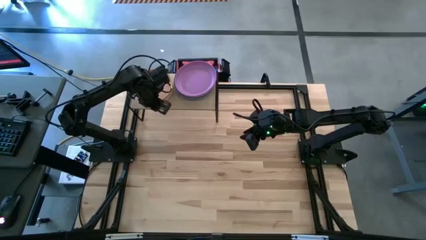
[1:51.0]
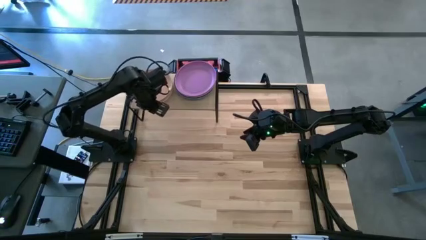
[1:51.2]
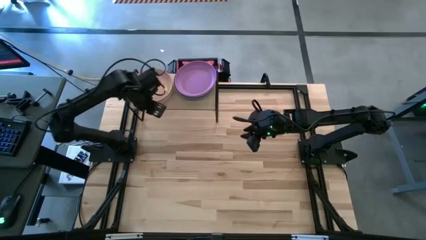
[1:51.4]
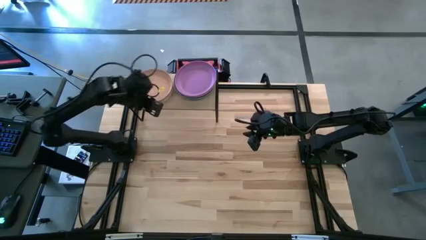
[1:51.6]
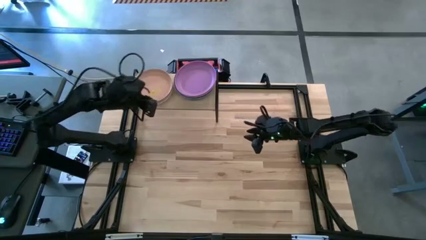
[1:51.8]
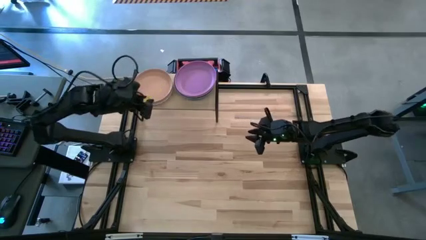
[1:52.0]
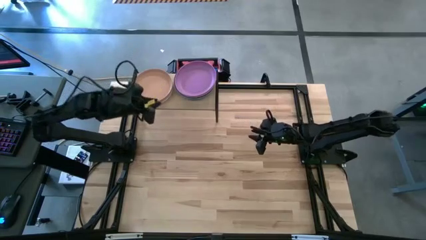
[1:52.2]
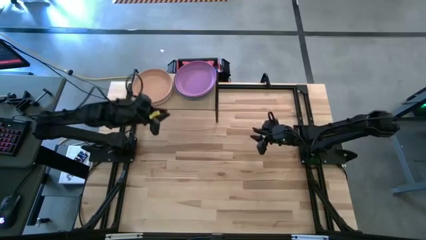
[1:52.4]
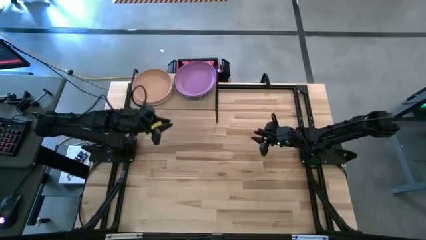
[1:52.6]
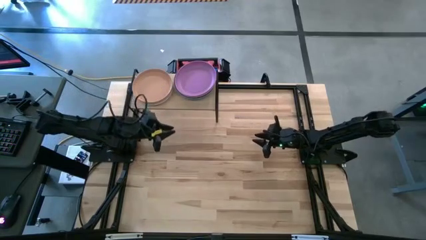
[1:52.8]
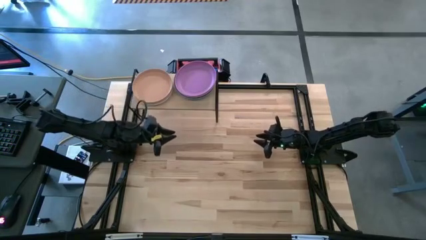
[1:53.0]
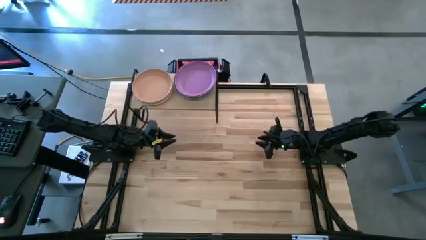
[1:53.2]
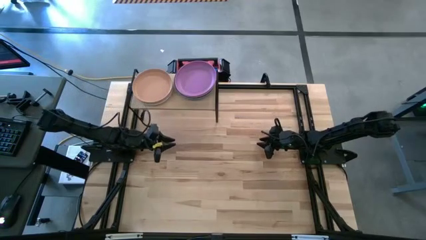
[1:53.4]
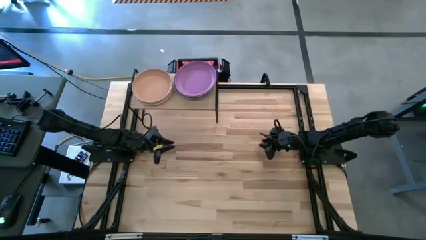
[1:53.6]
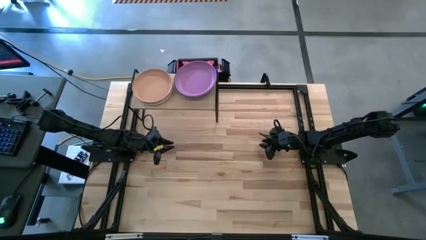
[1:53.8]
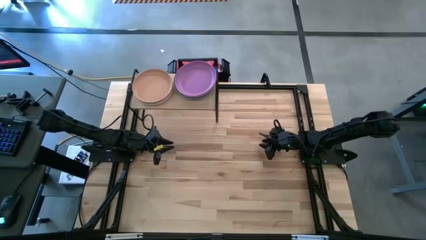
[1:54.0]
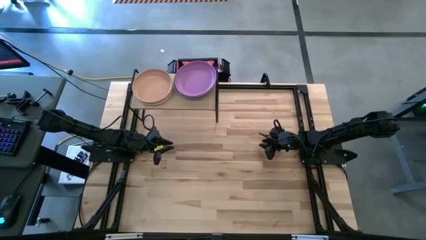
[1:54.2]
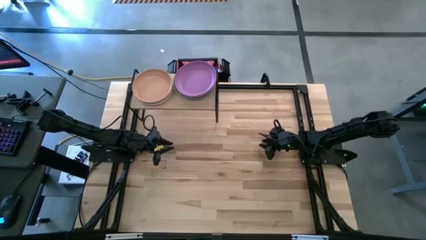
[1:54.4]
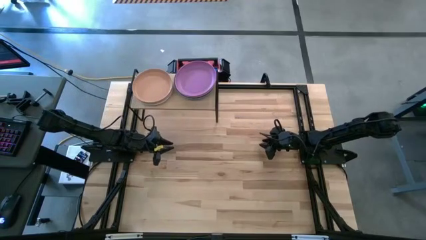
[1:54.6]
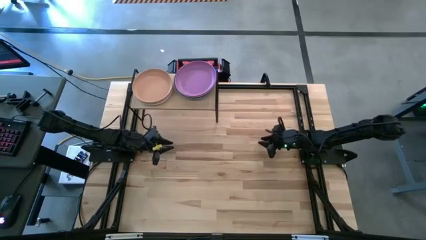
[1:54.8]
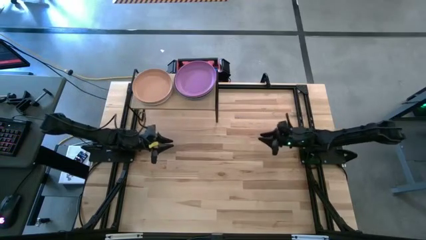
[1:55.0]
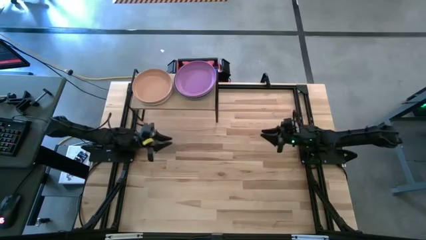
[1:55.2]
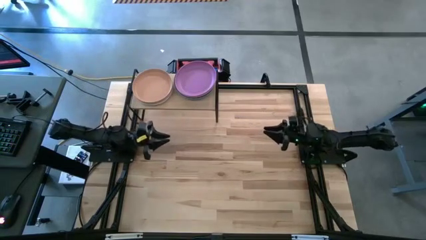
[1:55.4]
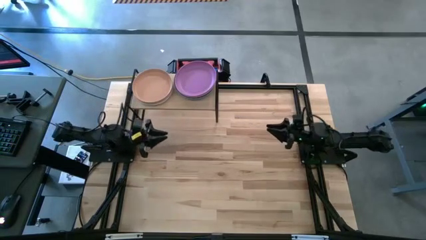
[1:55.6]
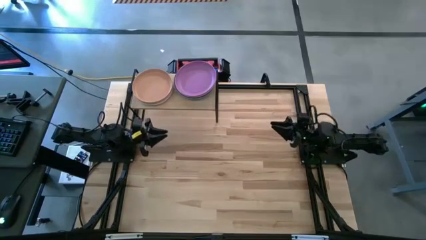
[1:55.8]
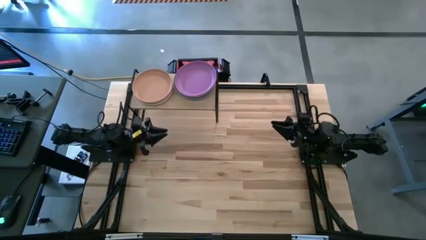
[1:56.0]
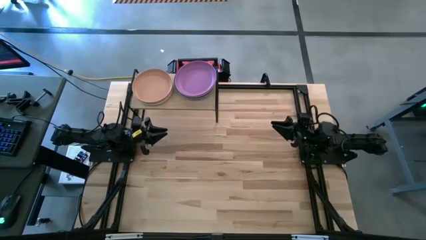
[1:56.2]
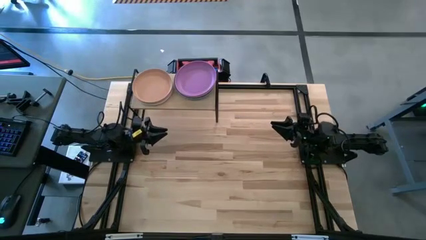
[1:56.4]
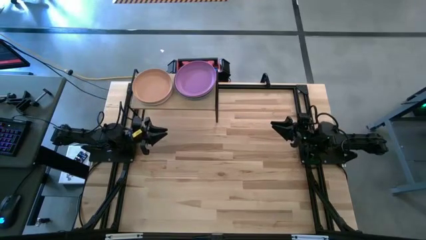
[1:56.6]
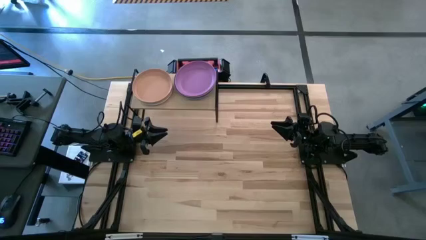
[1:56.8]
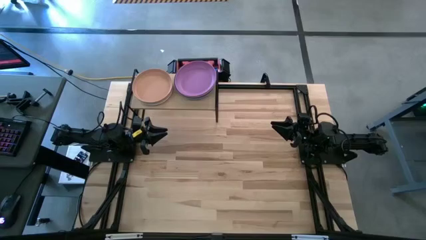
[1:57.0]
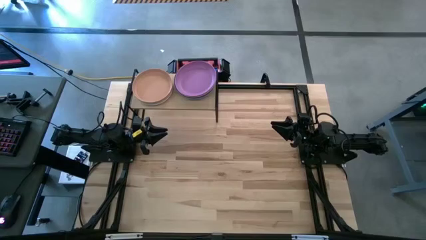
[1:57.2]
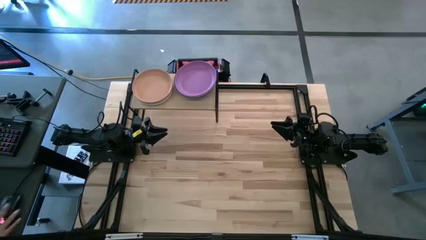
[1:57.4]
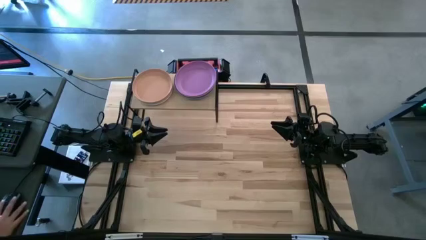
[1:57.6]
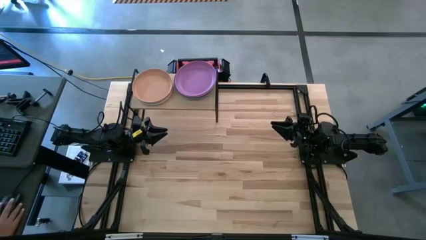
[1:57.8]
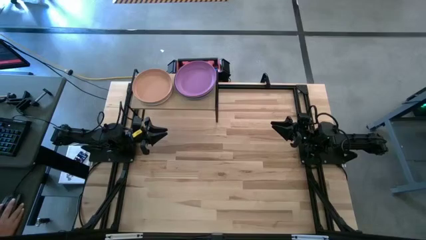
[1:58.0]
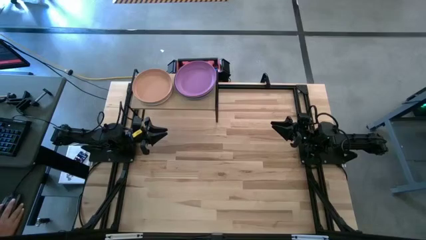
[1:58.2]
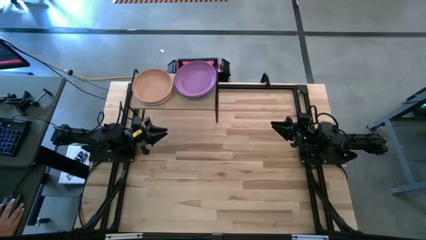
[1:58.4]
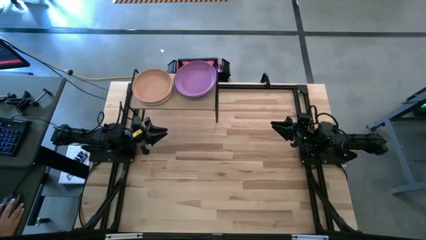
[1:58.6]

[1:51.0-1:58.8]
Task: Place and stack plates onto a shelf
Return to Home Position

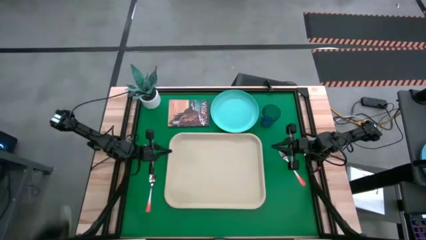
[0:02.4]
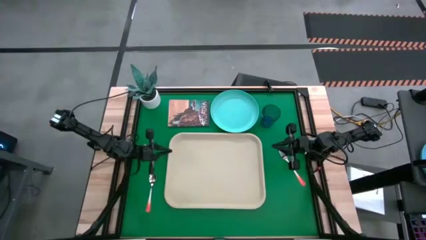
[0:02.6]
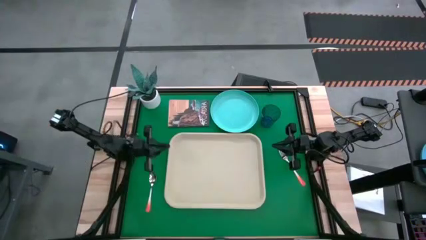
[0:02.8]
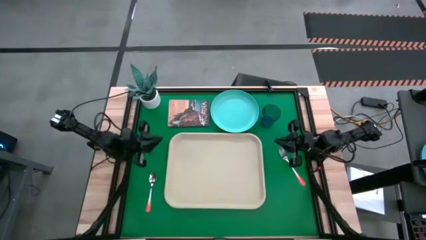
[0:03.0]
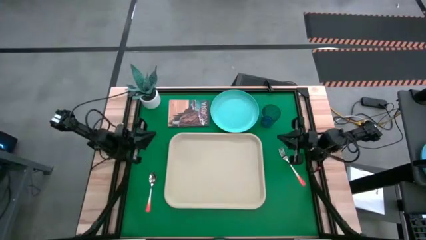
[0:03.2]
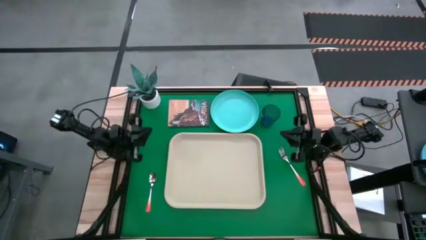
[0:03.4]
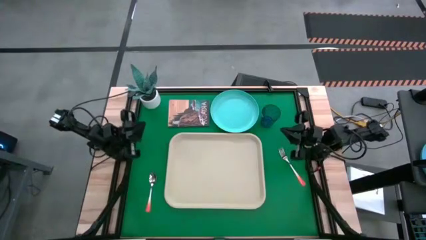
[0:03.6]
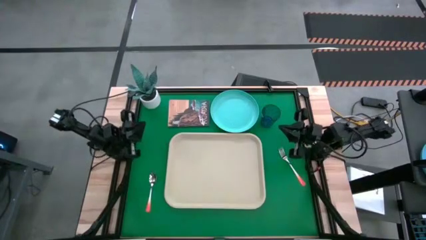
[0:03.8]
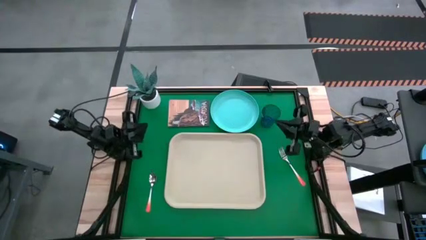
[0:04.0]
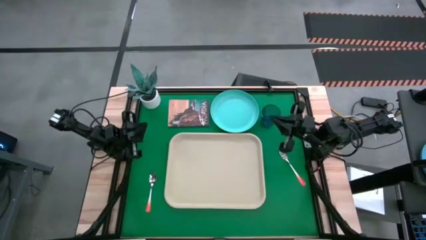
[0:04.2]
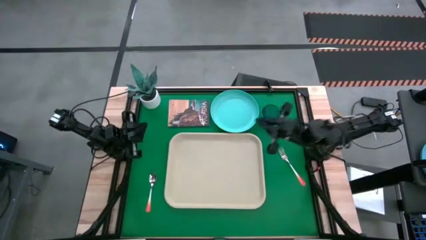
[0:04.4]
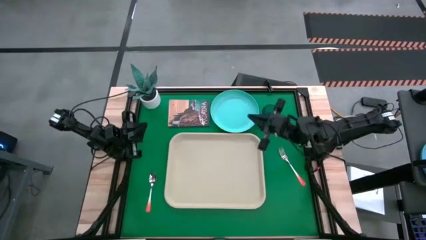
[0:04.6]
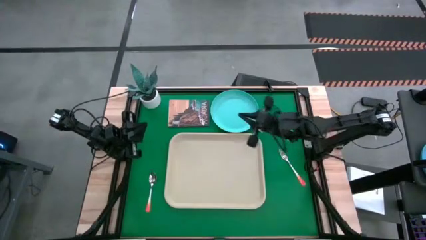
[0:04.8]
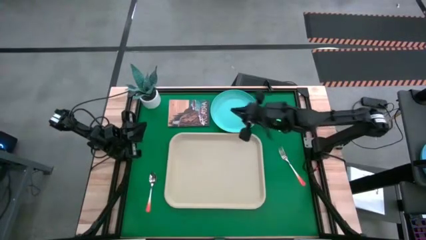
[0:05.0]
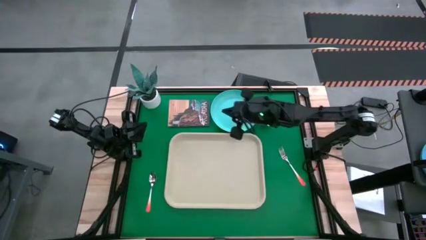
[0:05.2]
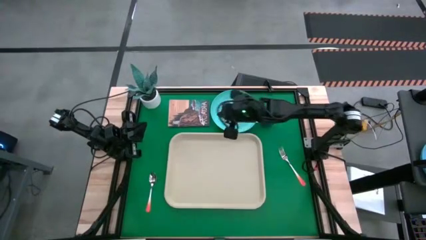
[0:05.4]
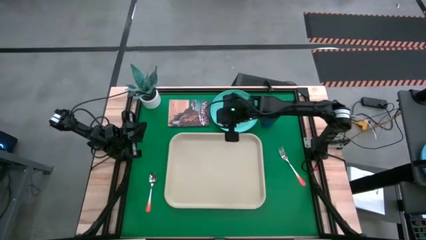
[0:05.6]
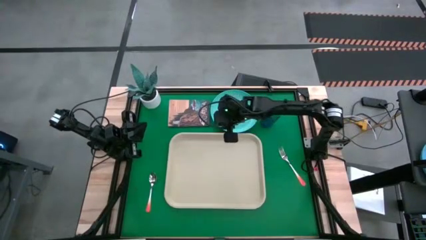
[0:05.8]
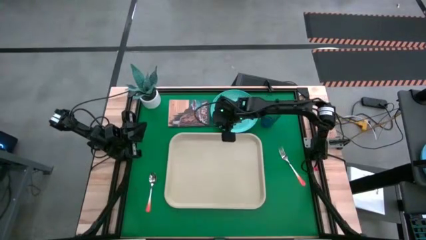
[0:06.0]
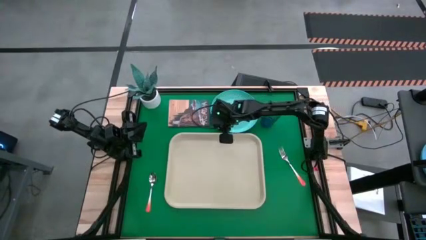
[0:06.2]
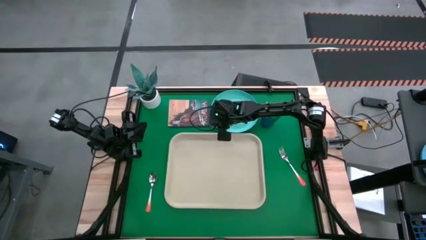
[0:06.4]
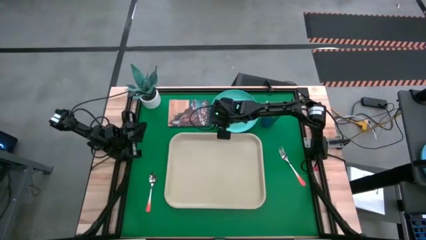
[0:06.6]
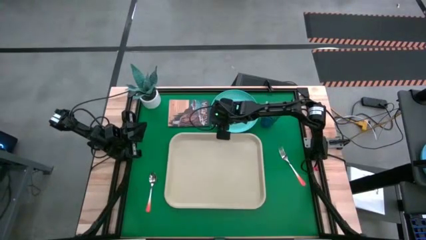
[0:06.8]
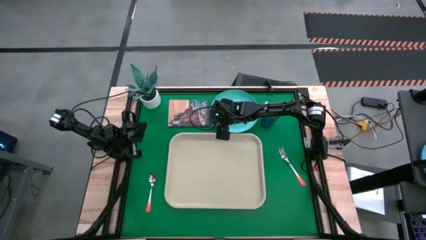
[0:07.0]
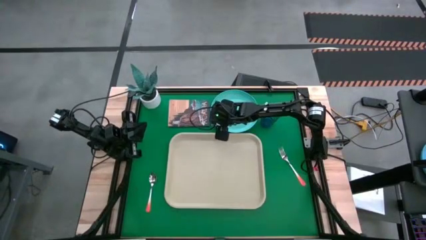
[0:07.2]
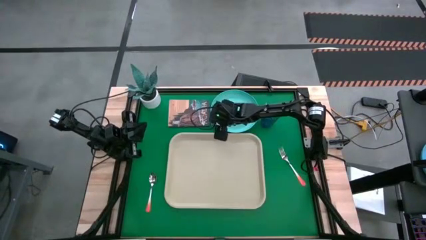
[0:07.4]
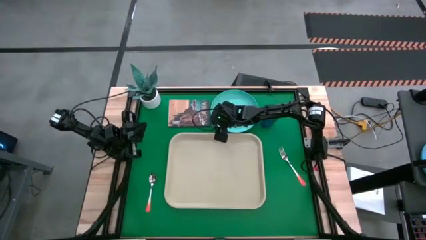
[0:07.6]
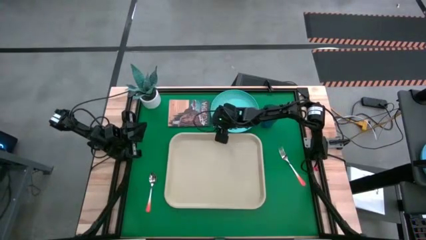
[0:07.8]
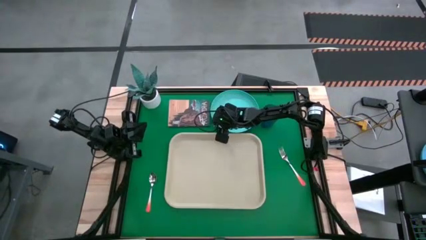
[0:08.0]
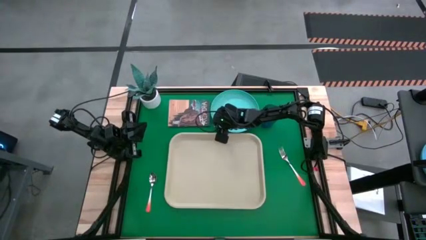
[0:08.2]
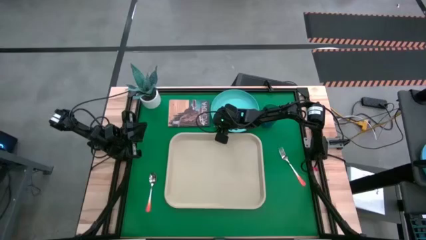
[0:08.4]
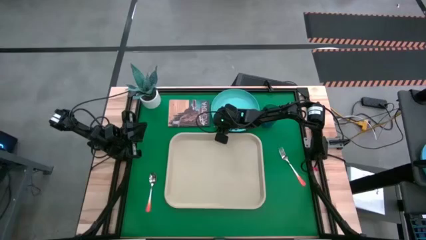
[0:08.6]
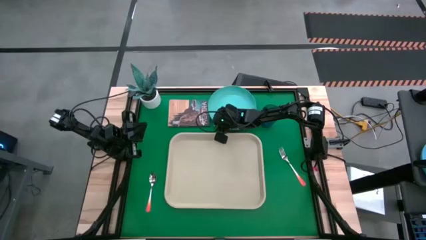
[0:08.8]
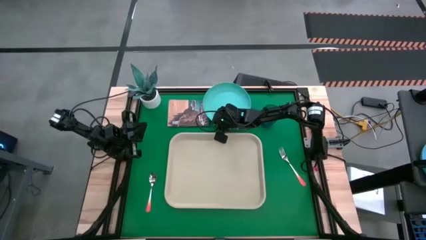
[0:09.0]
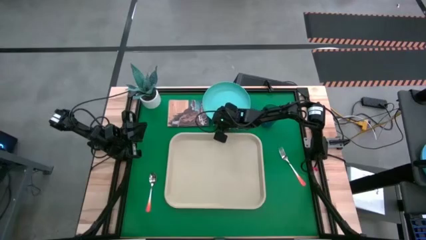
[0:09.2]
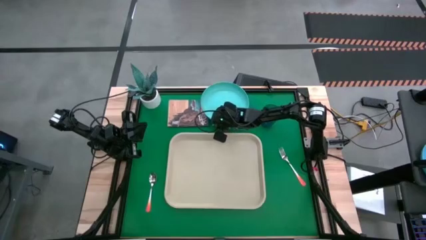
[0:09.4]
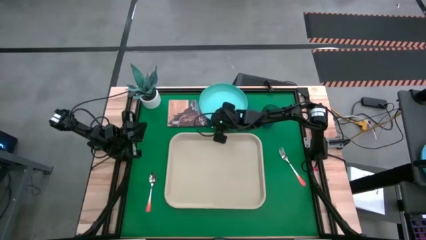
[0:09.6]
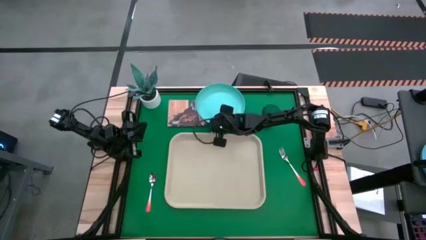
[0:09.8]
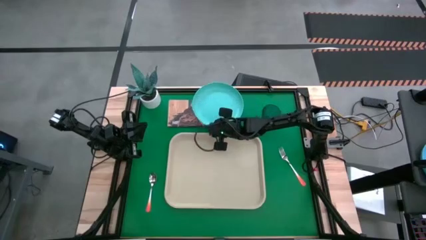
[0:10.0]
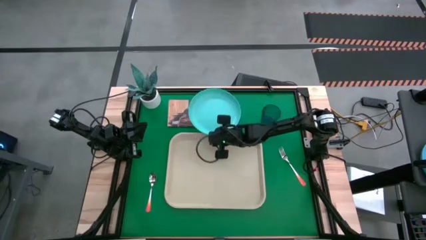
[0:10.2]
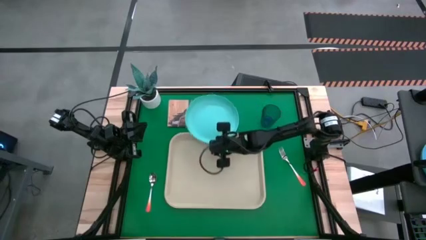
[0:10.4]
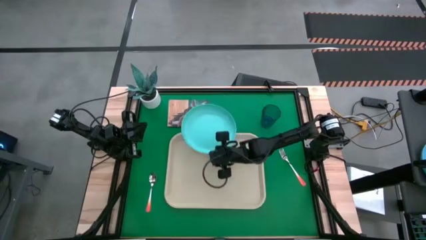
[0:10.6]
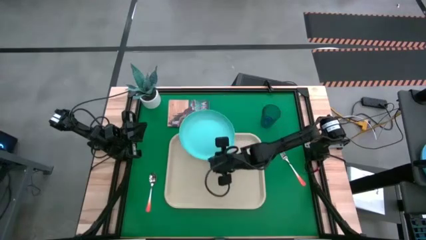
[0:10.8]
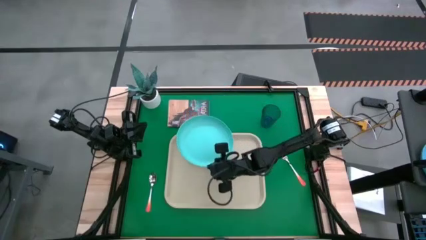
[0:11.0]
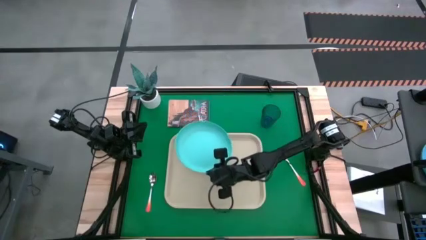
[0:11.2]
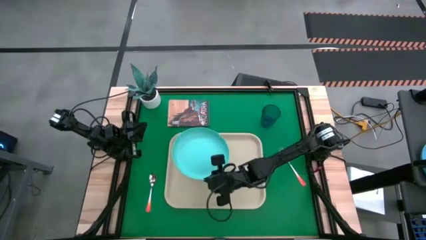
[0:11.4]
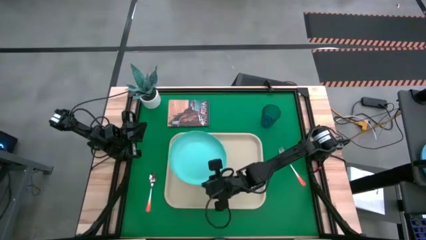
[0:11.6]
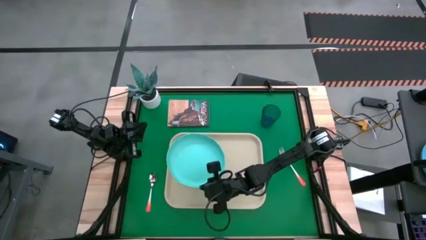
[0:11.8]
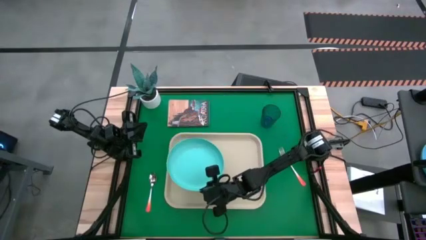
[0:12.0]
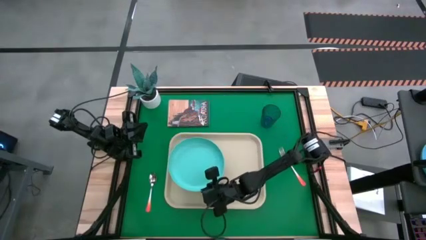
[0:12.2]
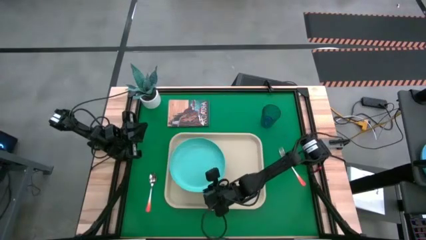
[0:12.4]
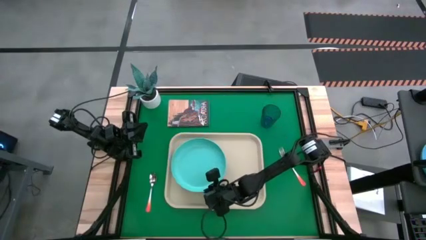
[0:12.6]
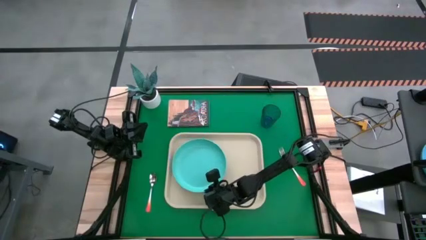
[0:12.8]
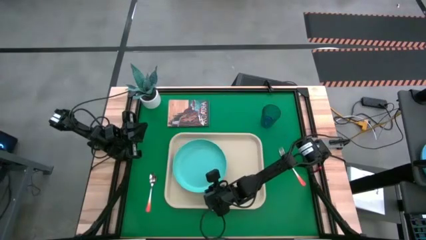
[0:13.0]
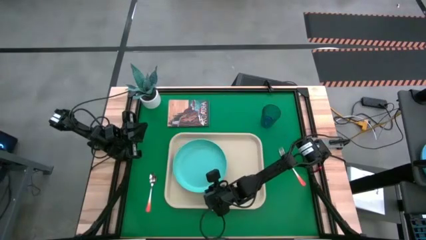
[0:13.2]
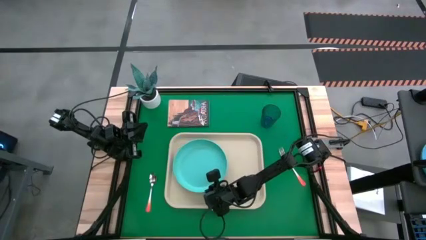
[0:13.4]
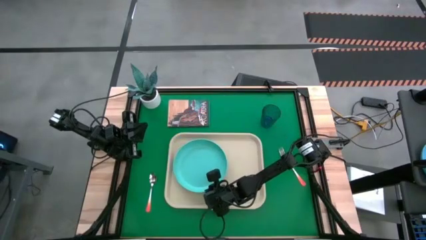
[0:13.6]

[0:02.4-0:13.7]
Task: Pick and place plate/cup/fork/spoon on tray
Put the blue plate on the serving tray
